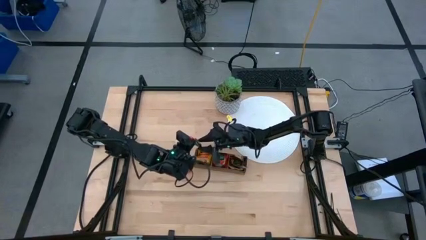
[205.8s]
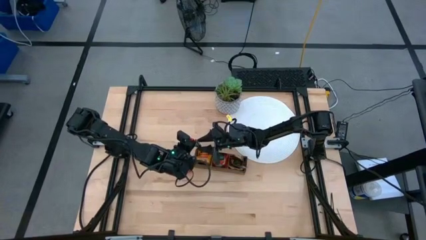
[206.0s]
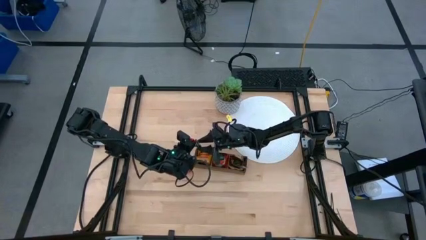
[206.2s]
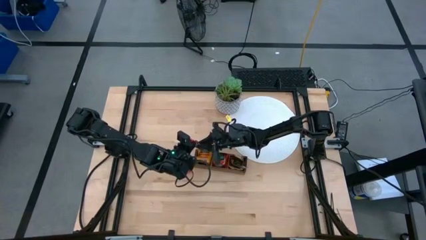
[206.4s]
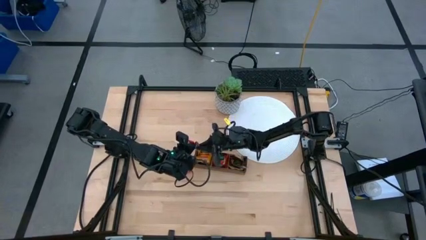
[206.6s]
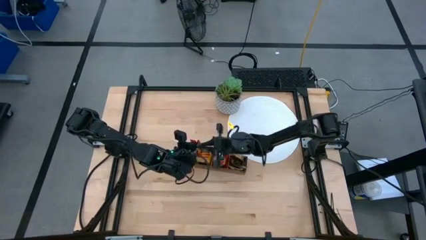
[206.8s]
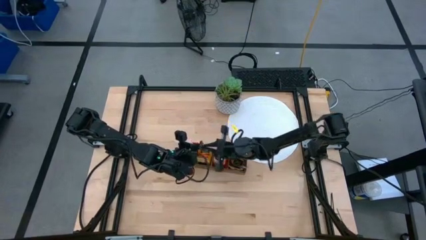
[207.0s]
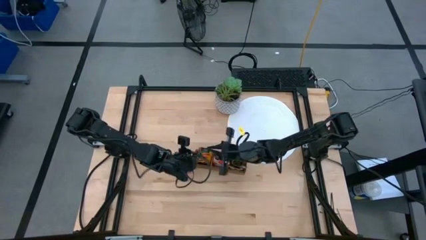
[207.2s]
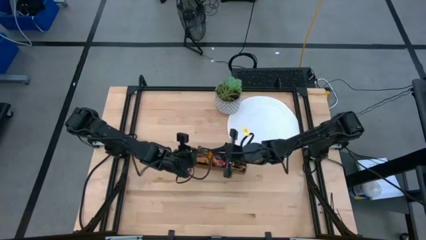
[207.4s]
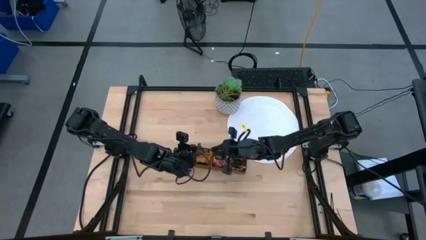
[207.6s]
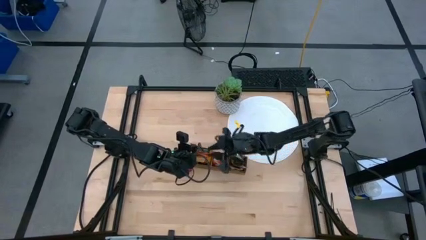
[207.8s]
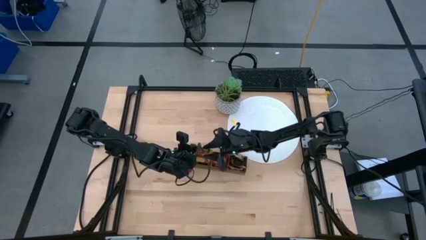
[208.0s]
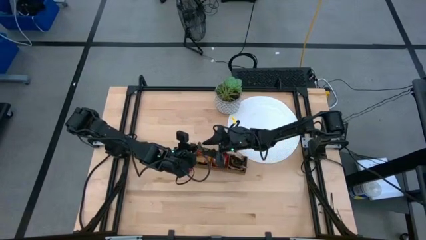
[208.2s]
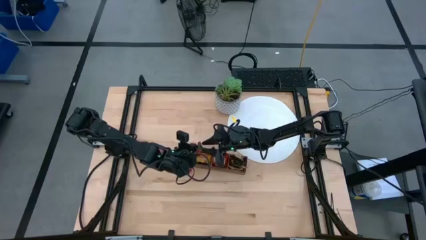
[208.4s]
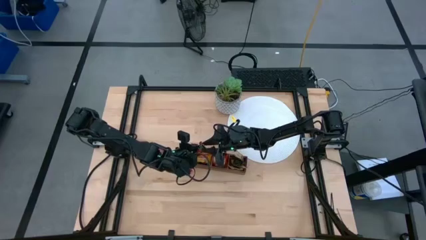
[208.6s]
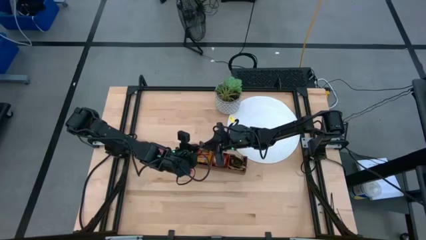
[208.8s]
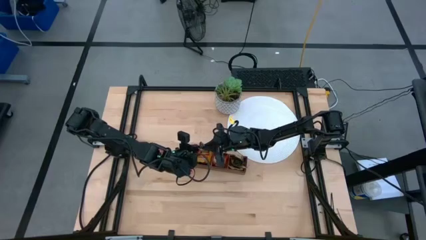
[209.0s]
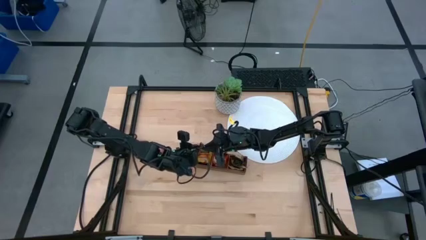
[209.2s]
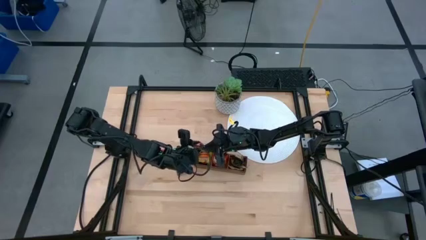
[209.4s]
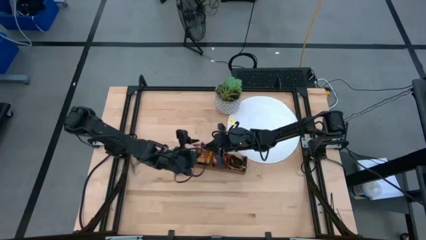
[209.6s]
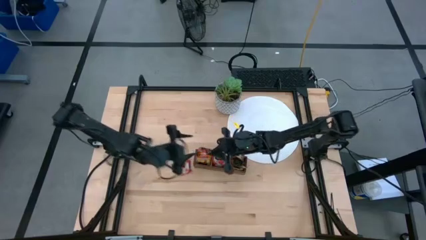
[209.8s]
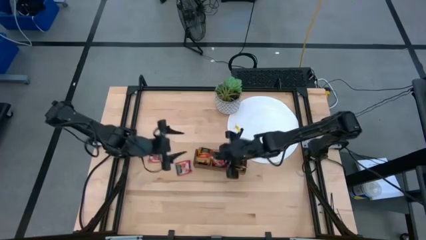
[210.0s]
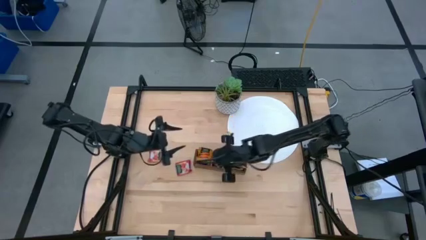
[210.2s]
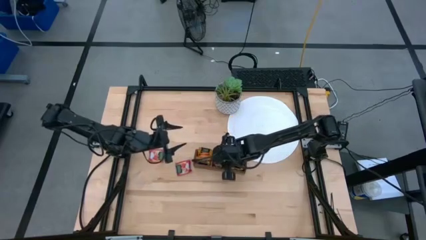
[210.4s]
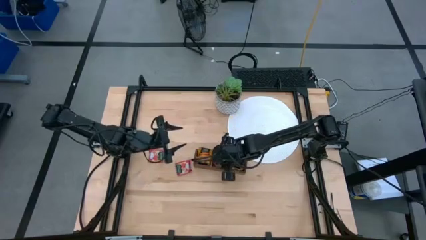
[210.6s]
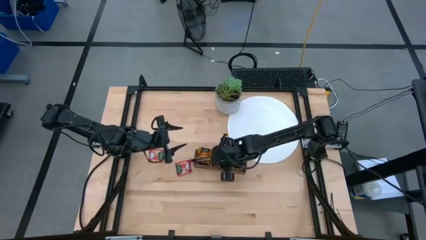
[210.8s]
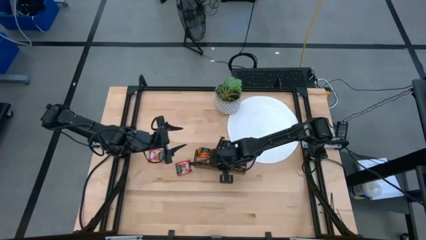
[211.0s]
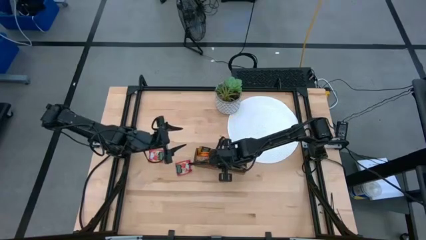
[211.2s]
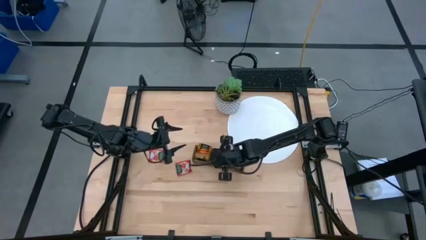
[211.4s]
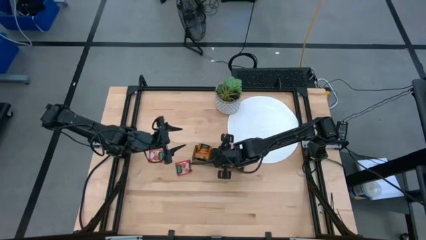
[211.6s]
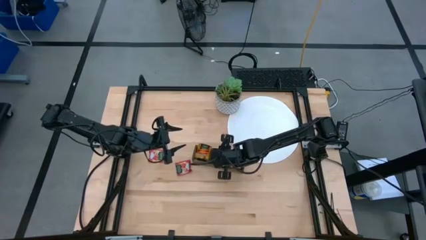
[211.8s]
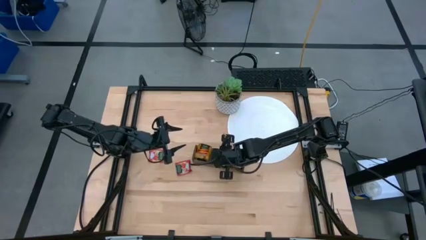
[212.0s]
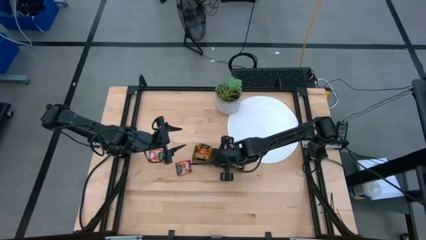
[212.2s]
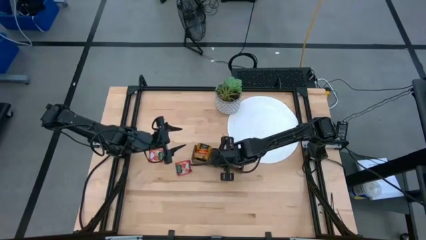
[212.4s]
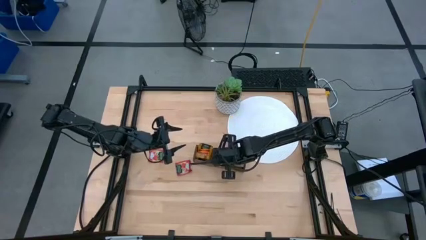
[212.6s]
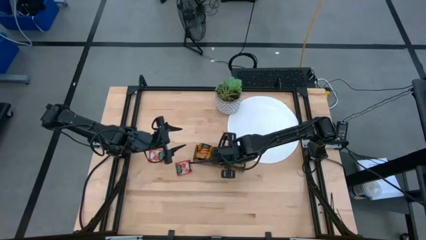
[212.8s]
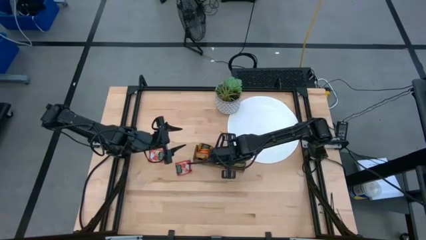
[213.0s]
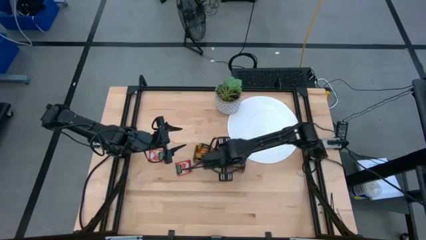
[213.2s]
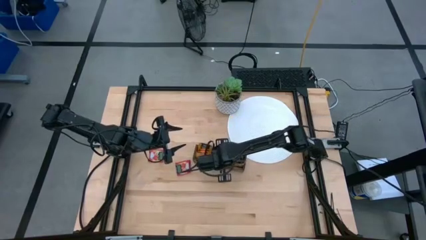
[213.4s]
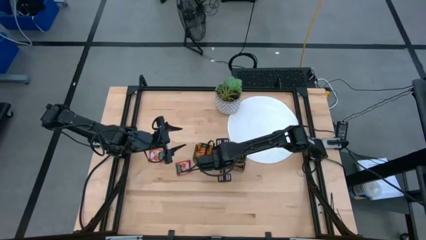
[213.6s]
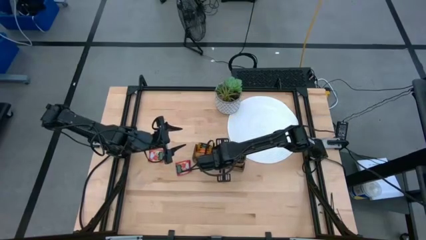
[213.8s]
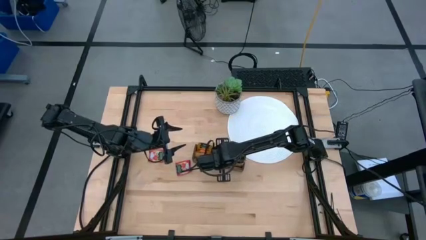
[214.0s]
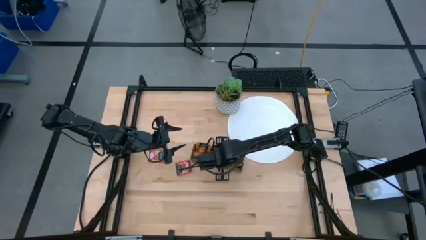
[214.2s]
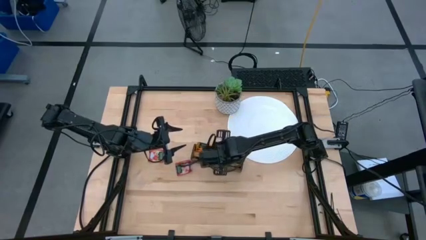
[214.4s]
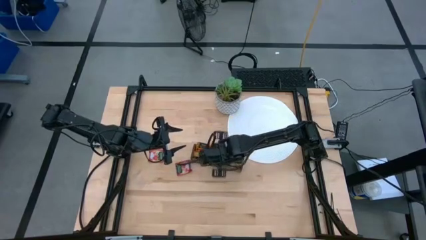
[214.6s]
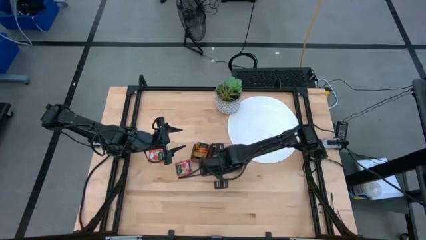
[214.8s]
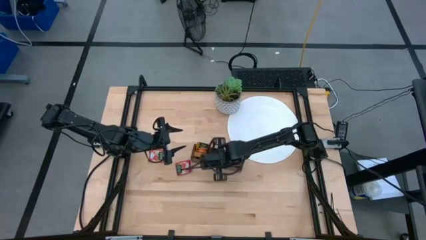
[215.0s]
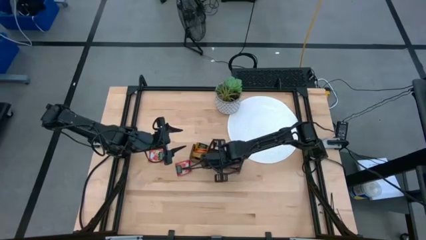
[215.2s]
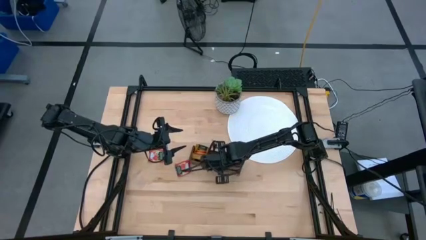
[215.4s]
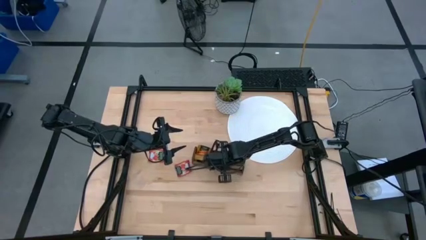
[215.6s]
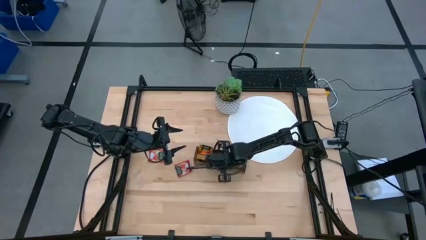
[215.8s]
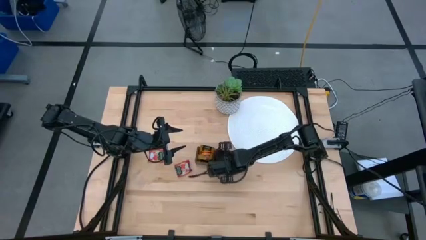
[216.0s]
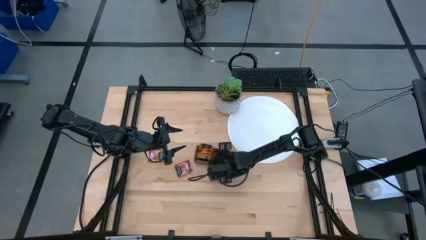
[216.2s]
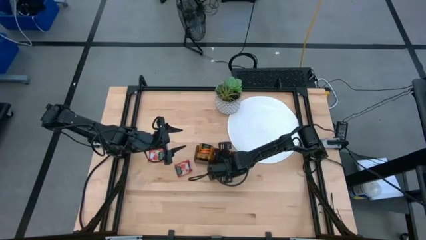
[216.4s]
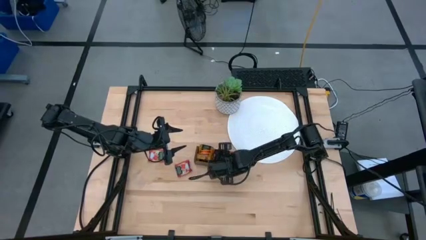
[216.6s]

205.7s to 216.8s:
Task: Pick & Place Tea
Put the red tea bag into the middle section of the wooden organizer

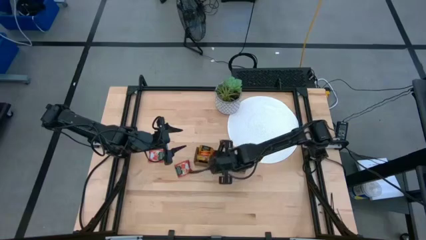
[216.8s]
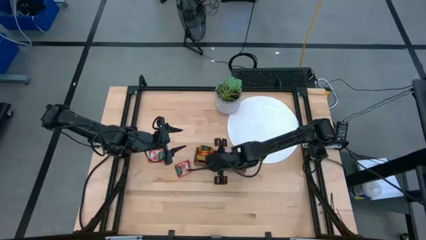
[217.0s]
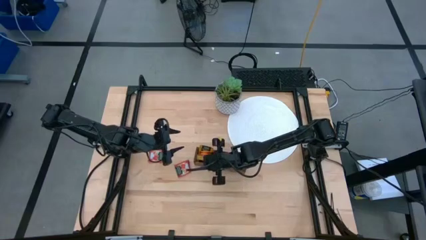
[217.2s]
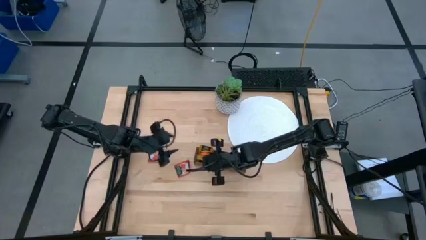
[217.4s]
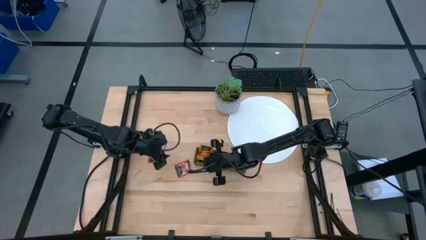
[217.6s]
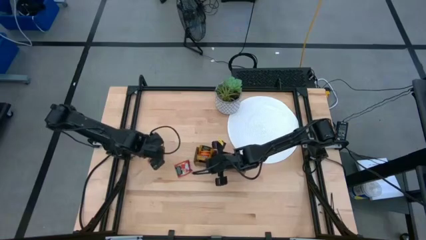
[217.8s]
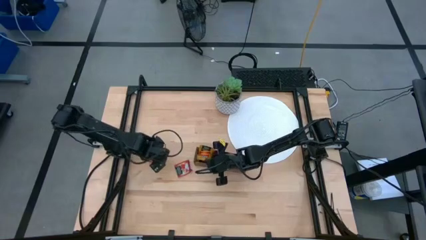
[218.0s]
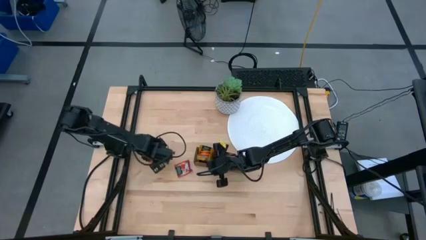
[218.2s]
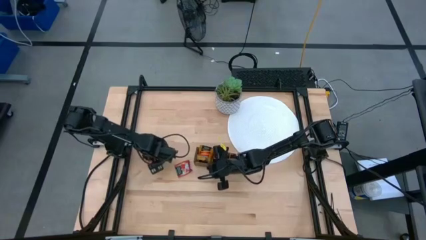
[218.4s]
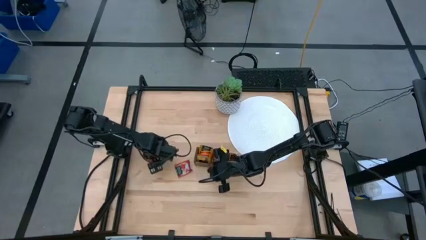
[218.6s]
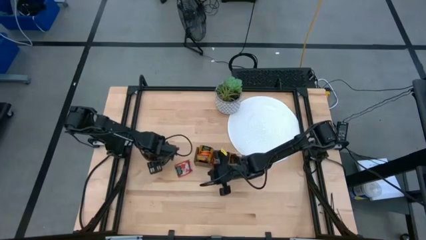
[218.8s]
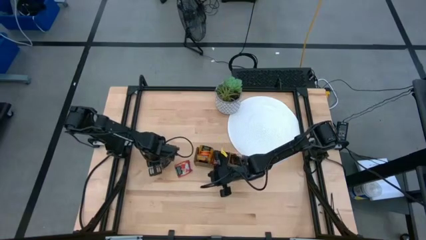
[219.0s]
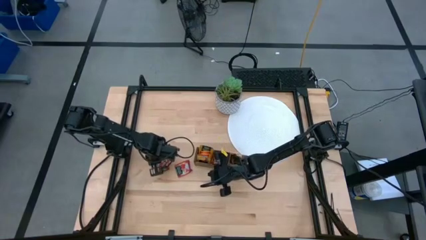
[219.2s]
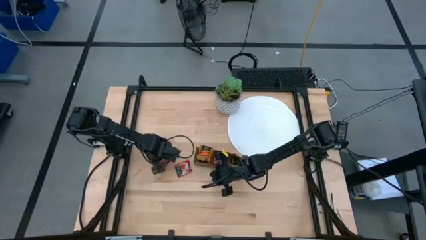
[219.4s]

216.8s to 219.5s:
Put the red tea bag into the middle section of the wooden organizer

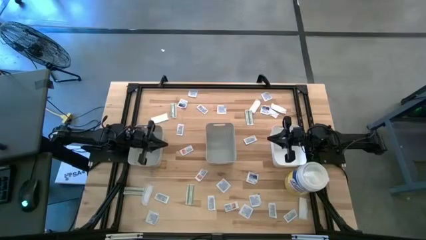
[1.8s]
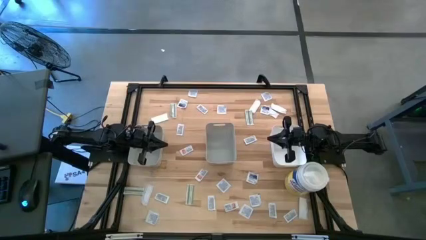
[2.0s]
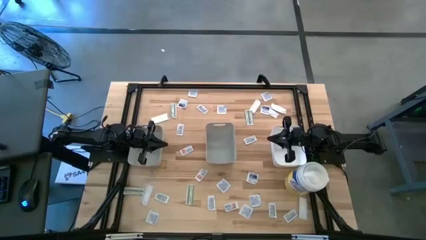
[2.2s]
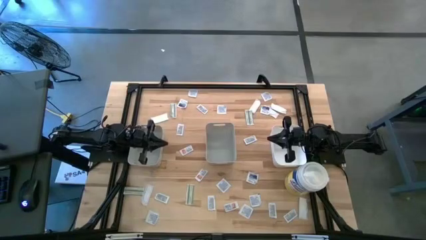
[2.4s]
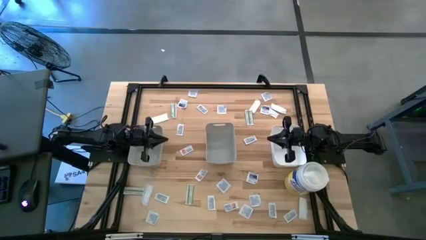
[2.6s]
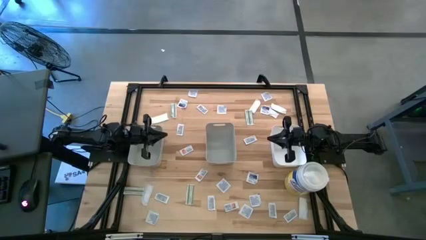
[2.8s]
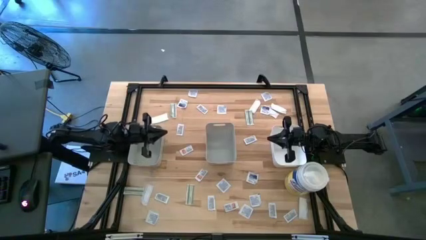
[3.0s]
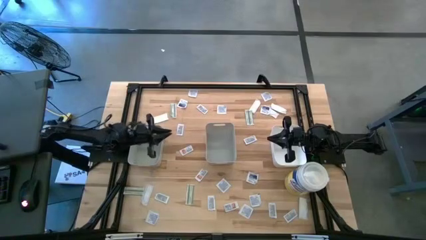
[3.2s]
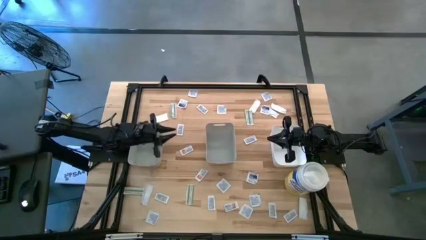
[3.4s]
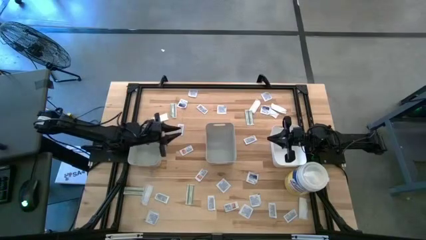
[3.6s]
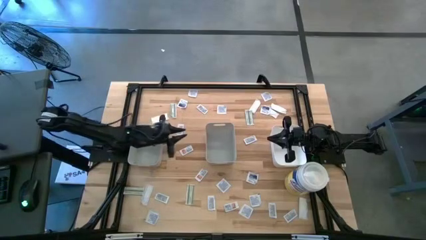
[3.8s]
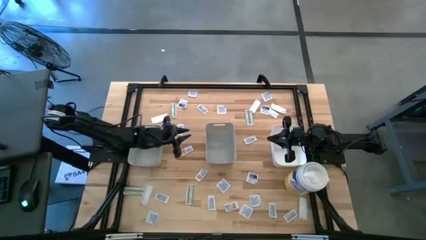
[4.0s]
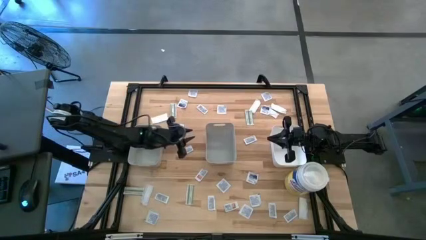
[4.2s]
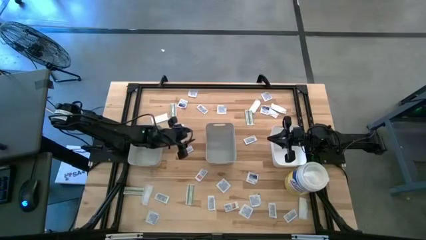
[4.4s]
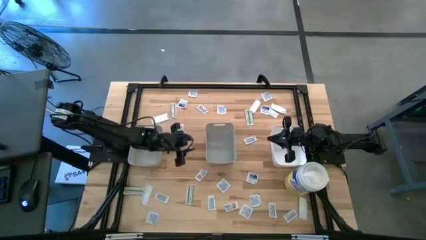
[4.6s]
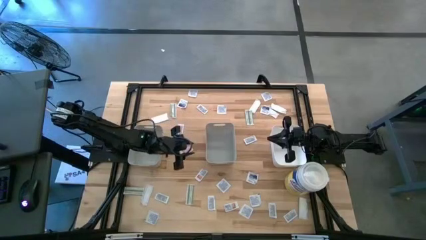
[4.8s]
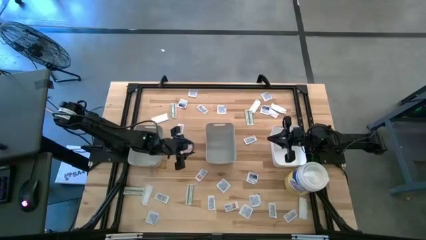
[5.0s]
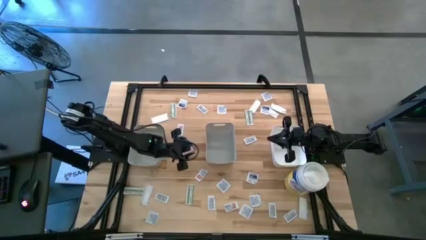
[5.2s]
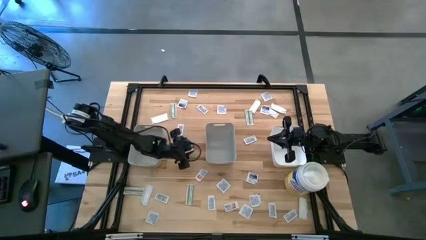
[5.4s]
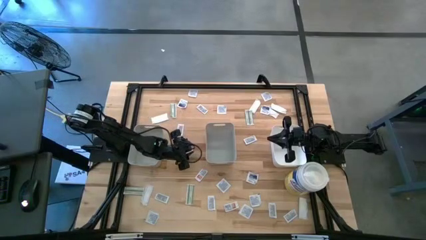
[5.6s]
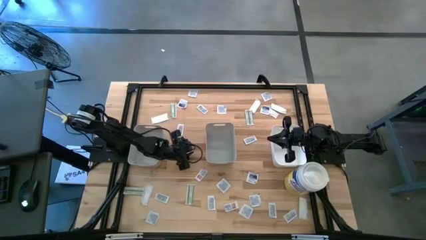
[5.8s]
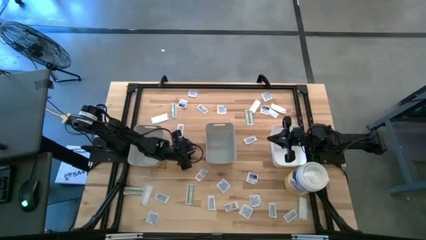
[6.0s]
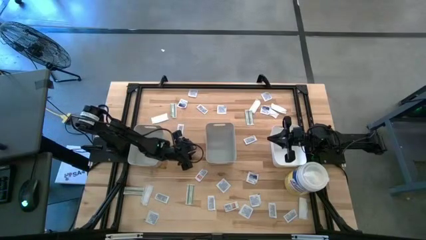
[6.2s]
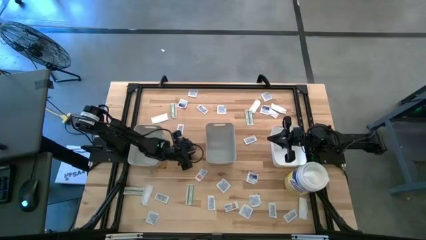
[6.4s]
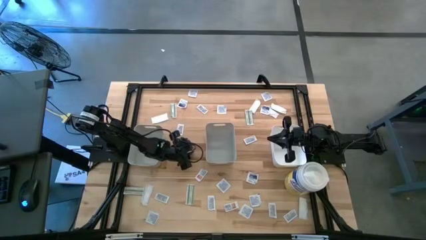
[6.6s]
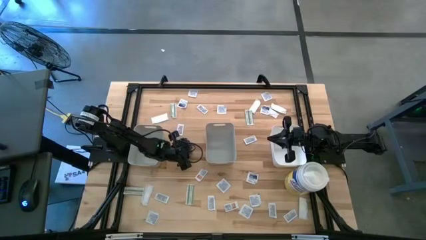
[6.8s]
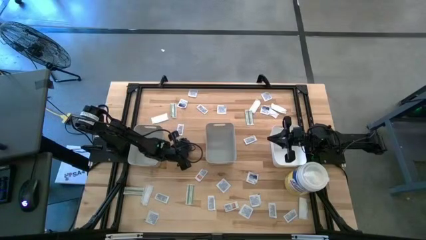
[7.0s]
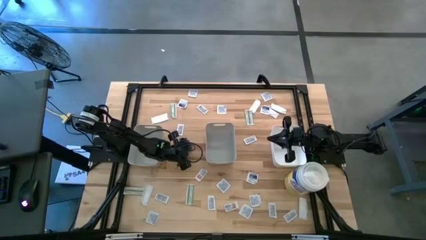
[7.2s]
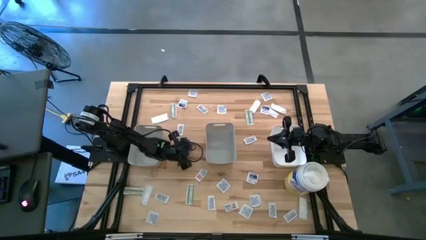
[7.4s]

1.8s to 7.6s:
Task: Pick & Place First Aid Supplies
Put the ointment pack into the right gray bin
